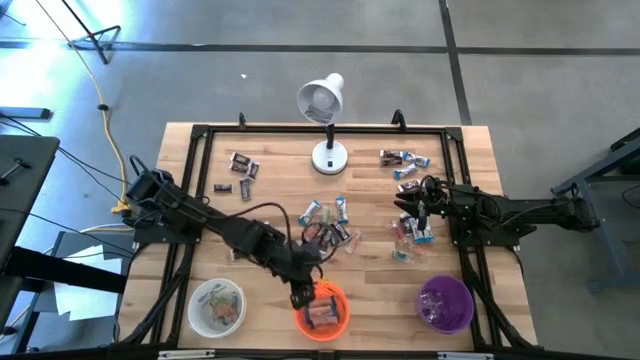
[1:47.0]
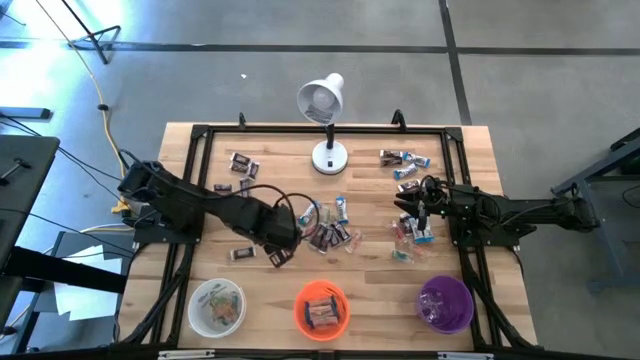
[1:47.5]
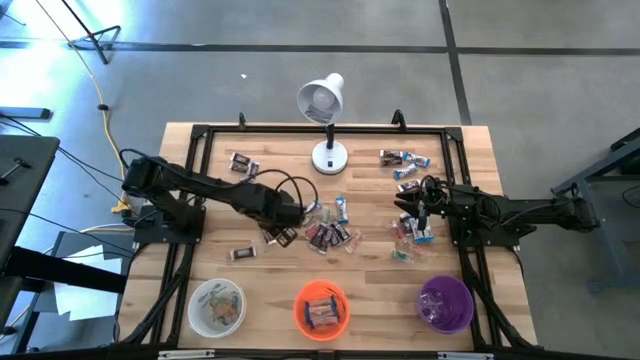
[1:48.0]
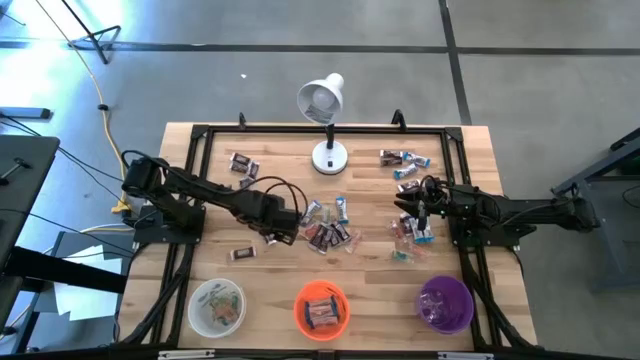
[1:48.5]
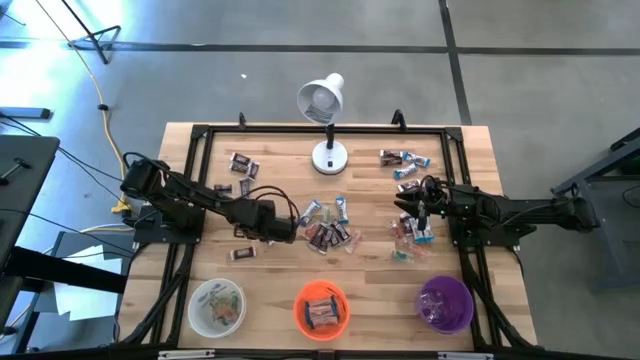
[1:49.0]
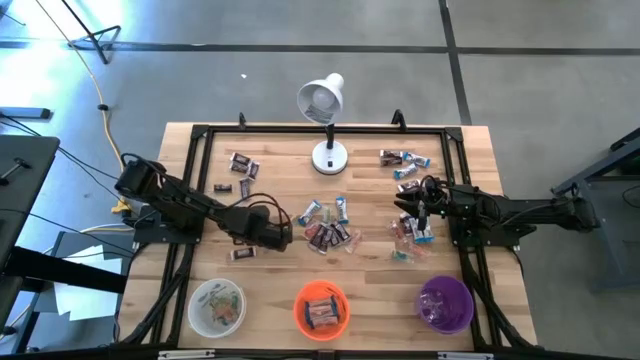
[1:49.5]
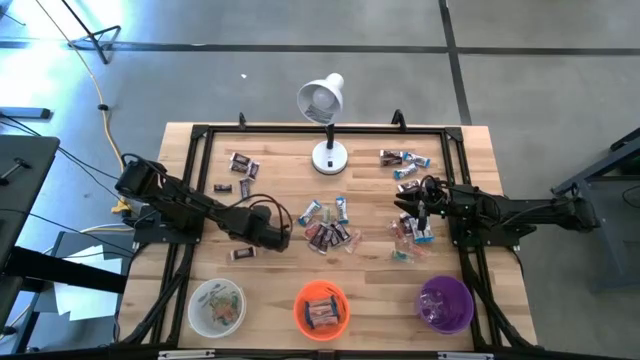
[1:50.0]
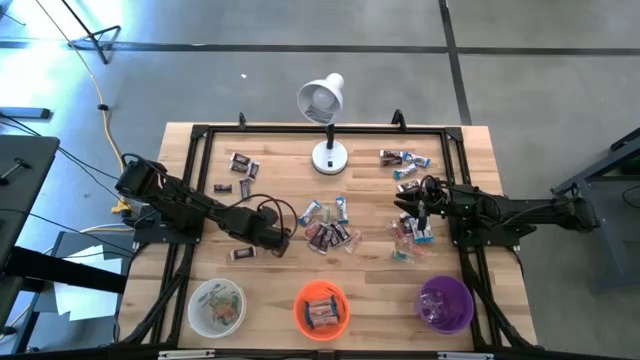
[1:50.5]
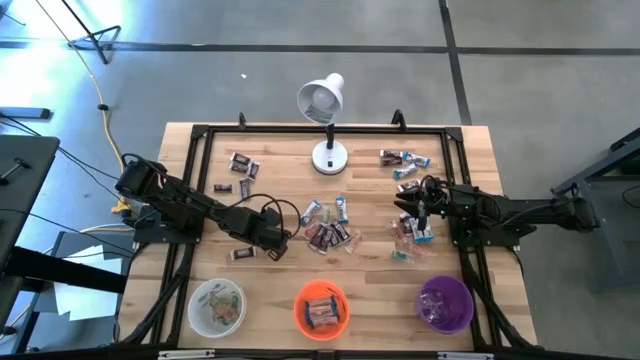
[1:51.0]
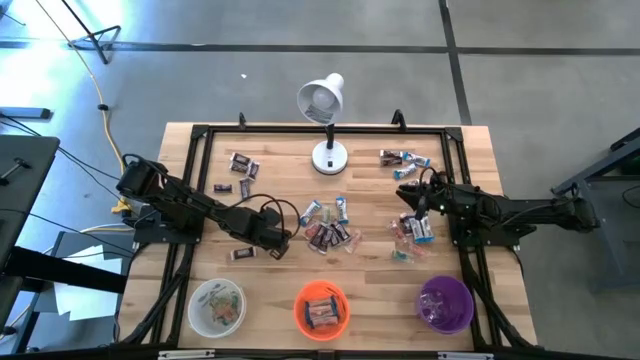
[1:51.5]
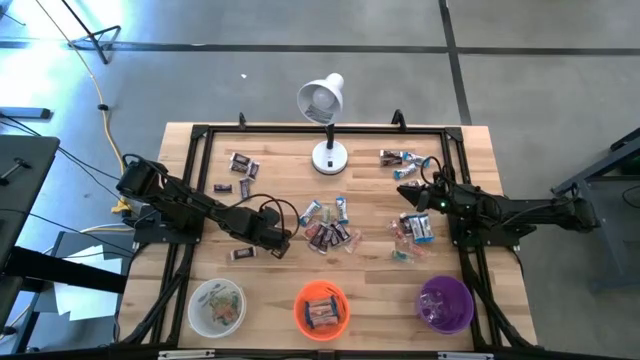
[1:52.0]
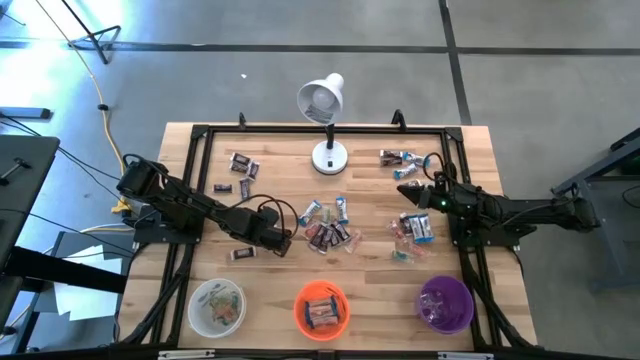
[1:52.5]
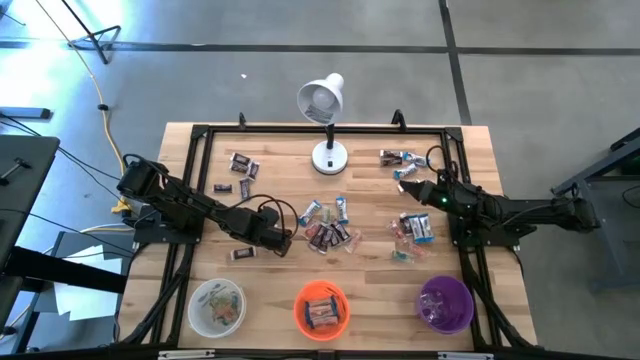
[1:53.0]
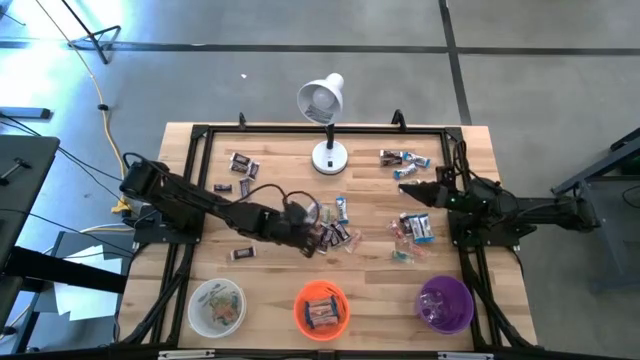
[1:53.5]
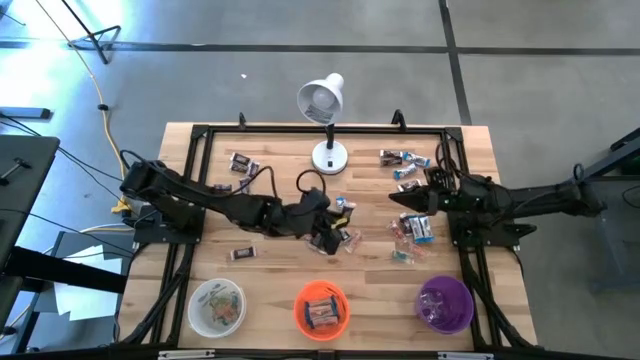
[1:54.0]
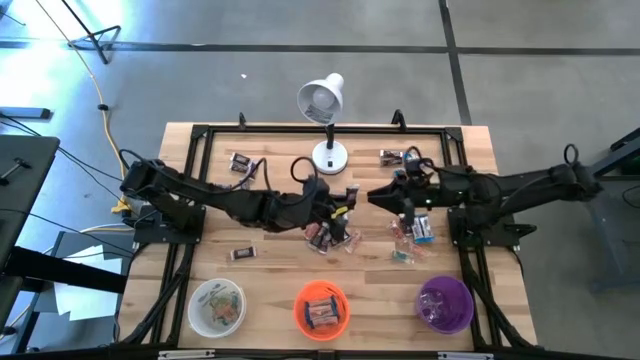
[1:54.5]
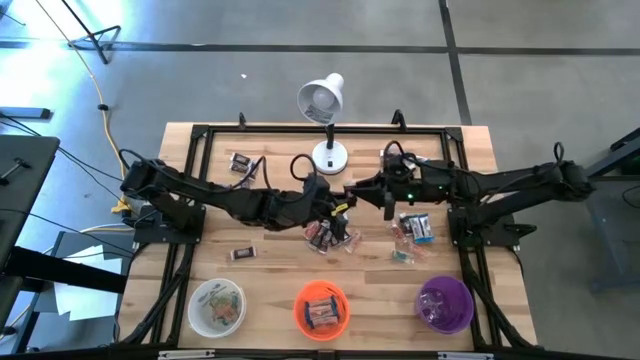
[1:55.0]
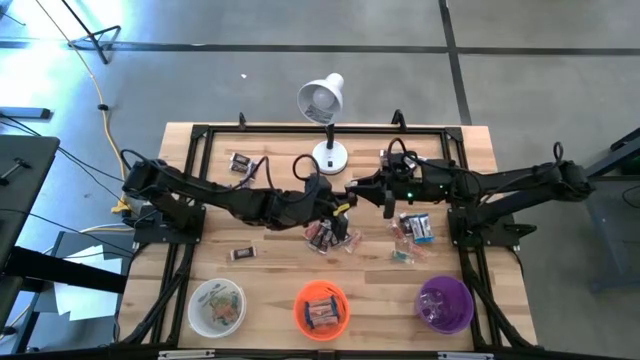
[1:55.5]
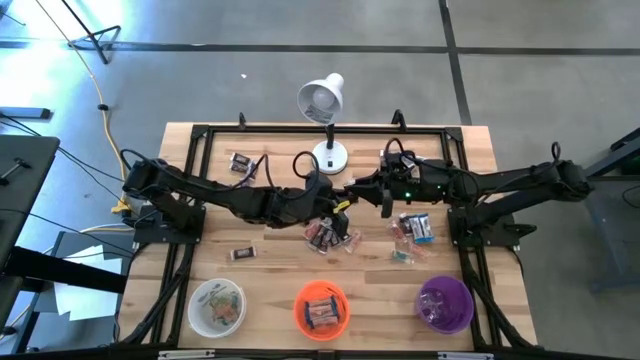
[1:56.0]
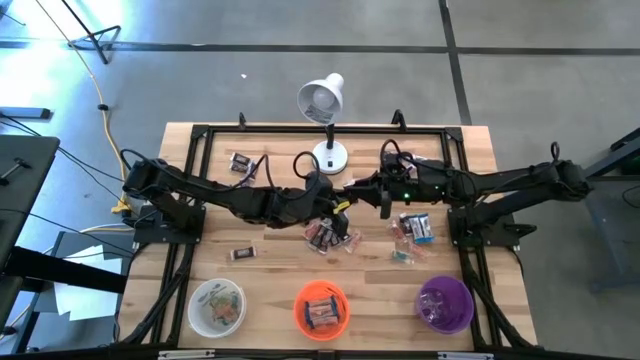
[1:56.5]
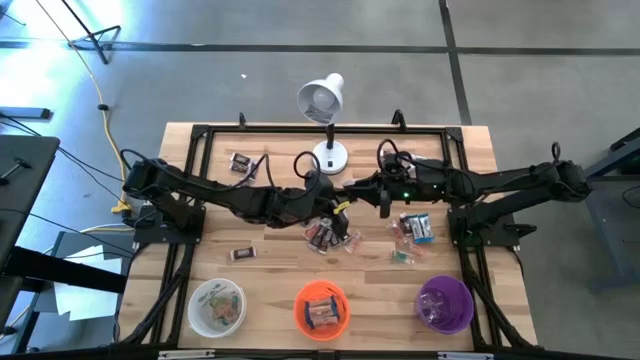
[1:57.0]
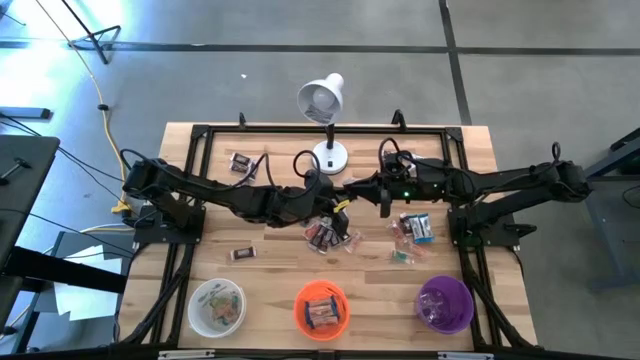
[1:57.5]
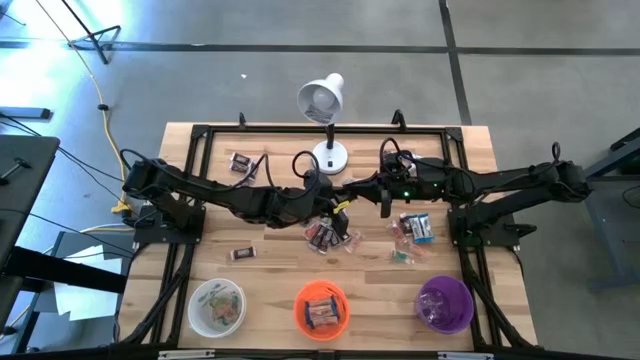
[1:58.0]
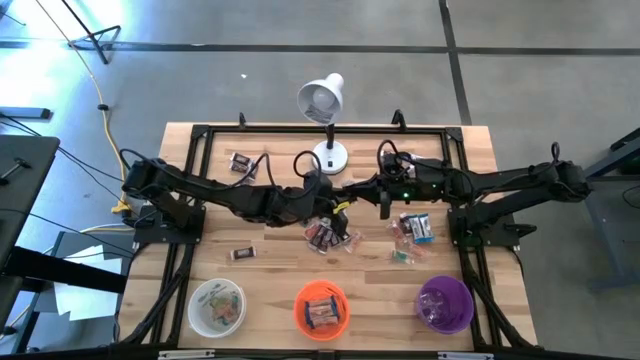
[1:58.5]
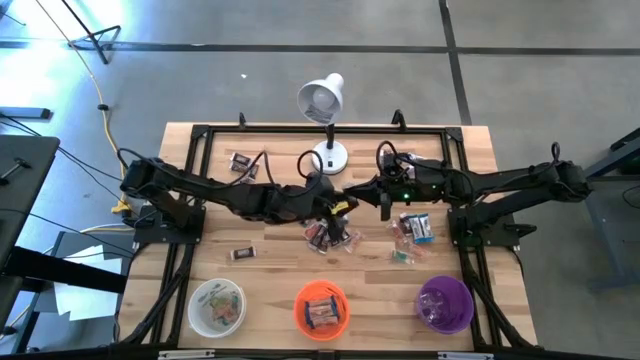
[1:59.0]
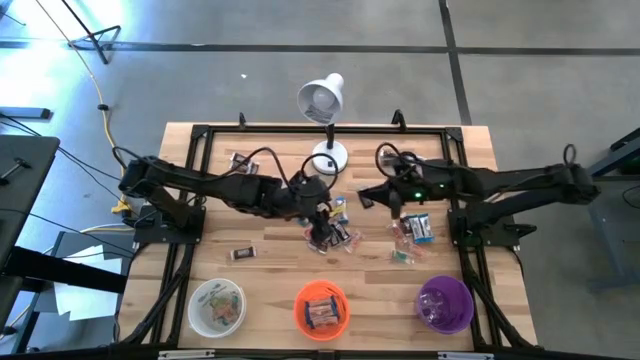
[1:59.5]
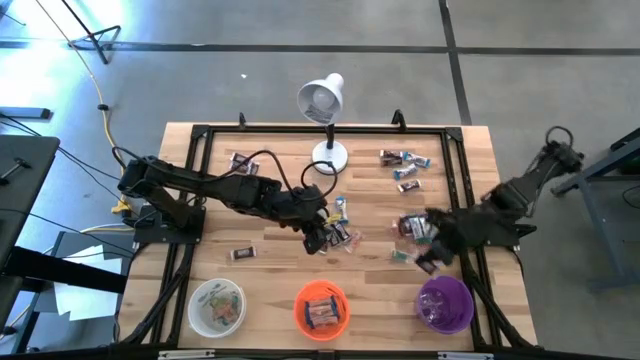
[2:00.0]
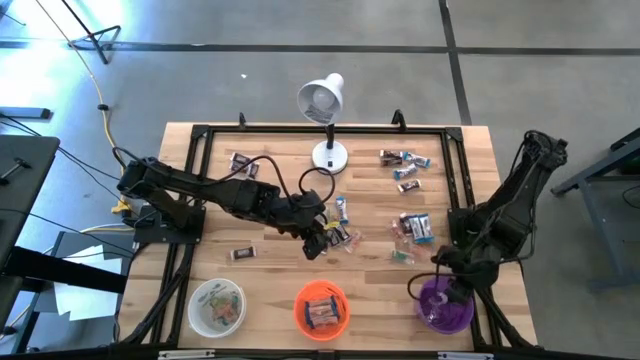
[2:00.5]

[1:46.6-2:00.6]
Task: Organize candy in baskets
Put the brown chocolate bar into the purple bucket

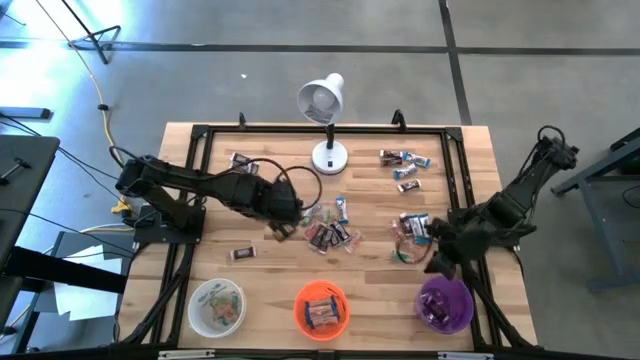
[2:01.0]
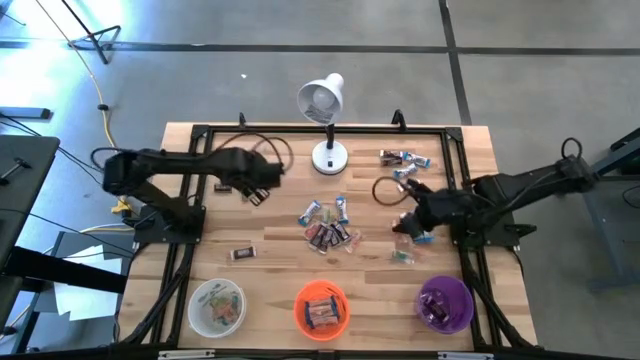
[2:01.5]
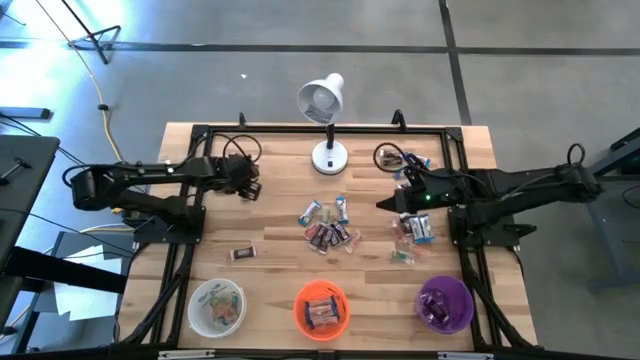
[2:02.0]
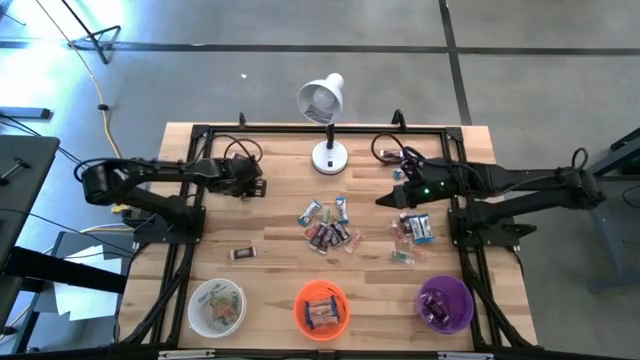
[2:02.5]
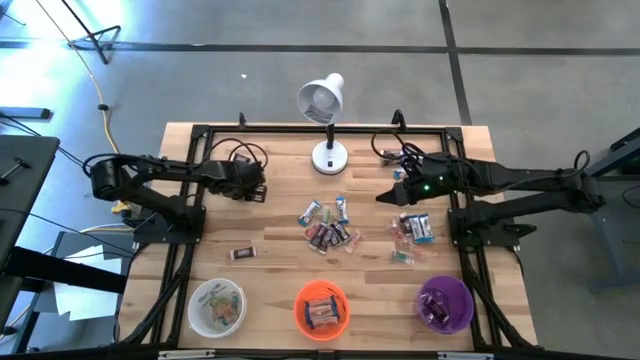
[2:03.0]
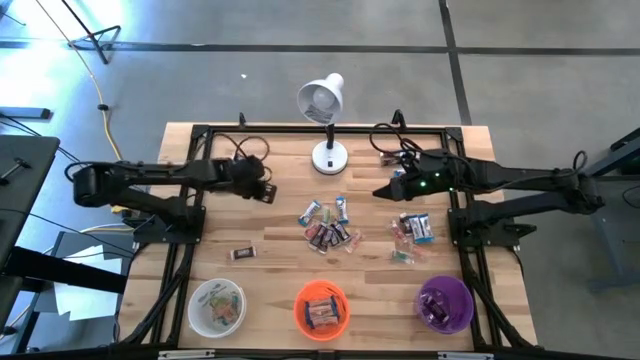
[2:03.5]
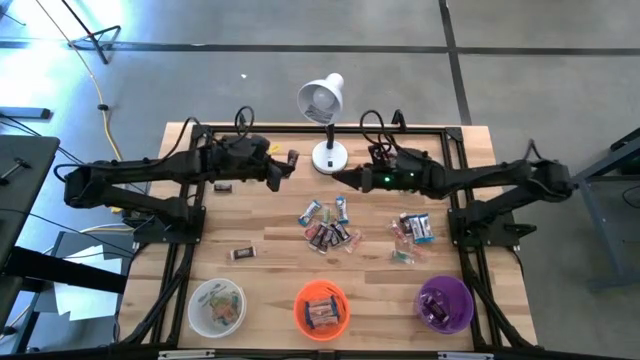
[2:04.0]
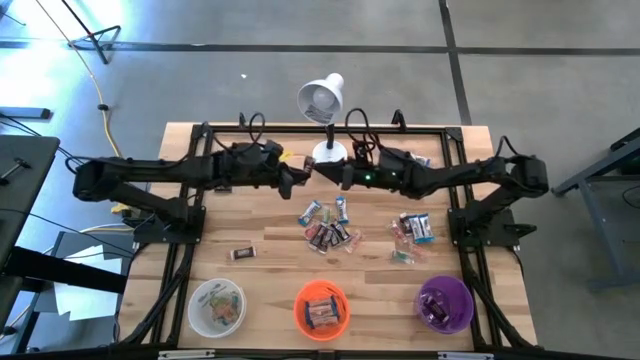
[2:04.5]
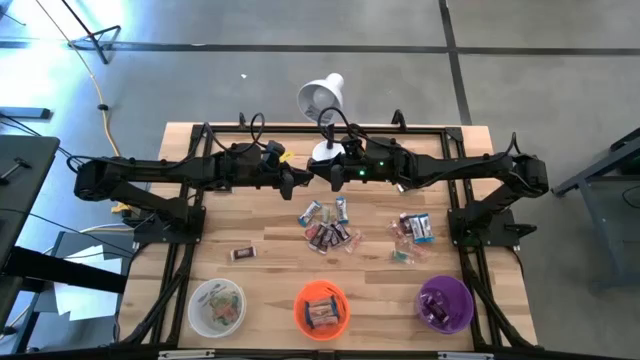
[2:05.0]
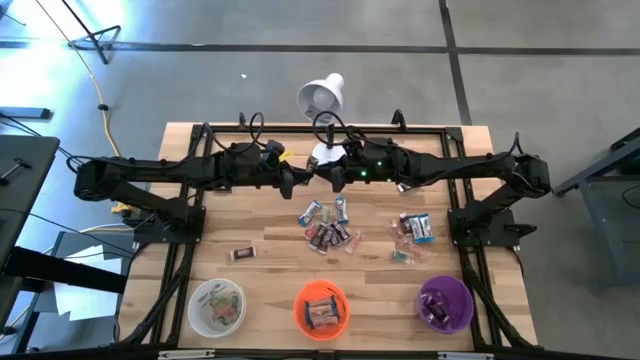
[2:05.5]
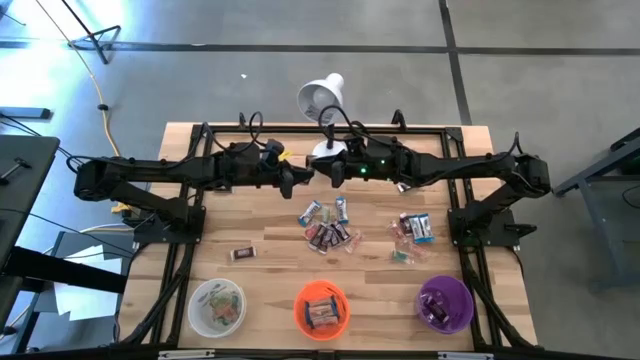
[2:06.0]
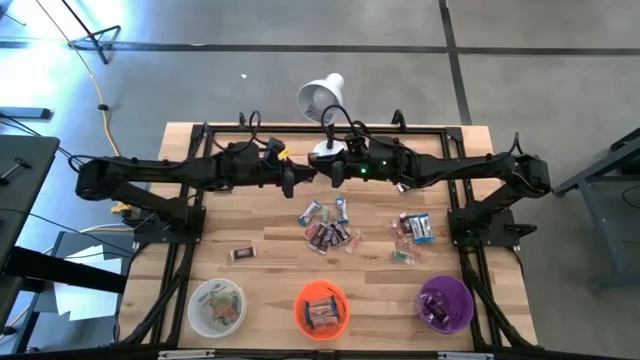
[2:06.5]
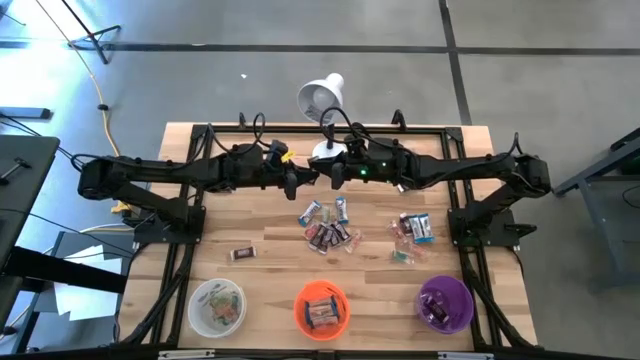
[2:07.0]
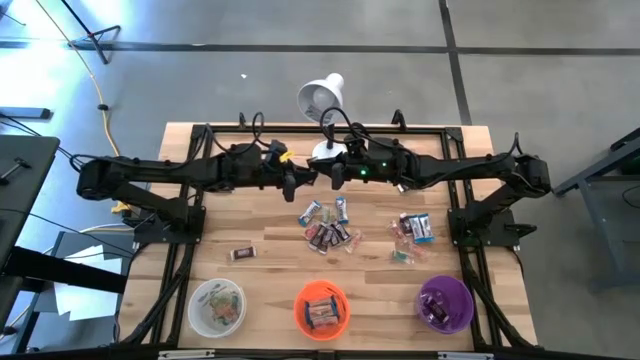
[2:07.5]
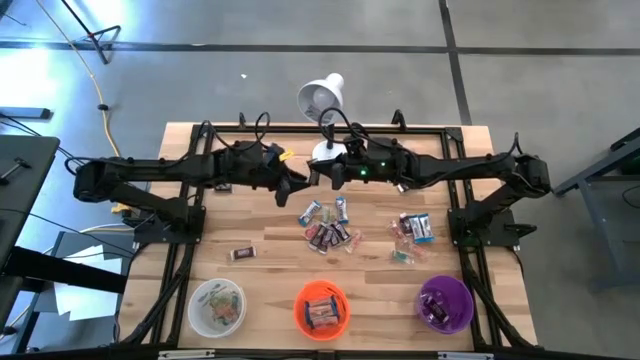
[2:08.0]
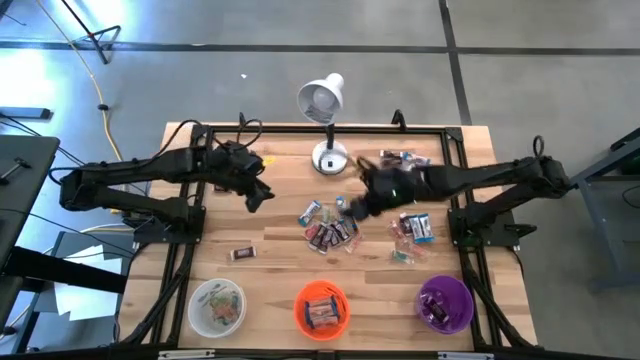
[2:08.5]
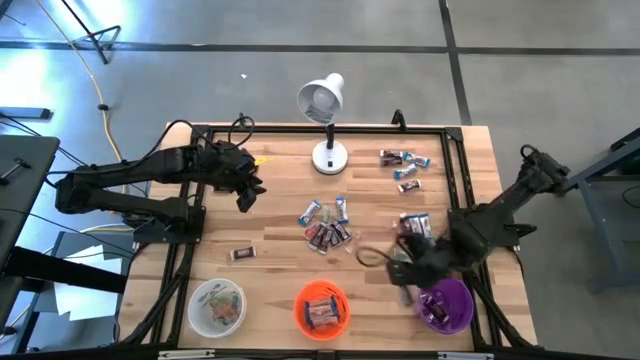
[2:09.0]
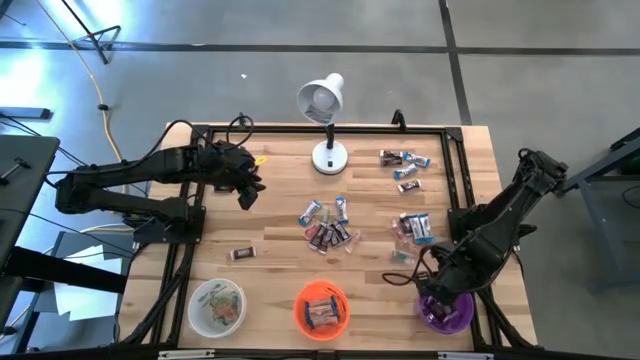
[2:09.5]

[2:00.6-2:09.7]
Put the brown chocolate bar into the purple bucket
